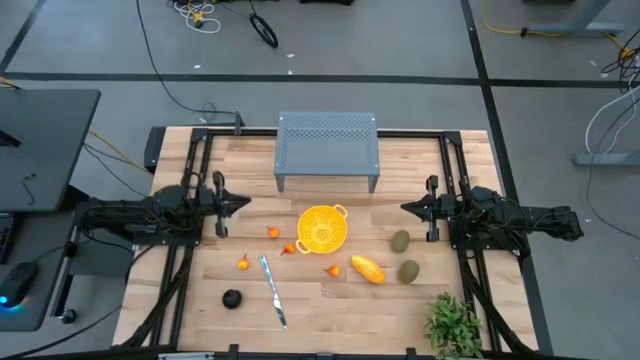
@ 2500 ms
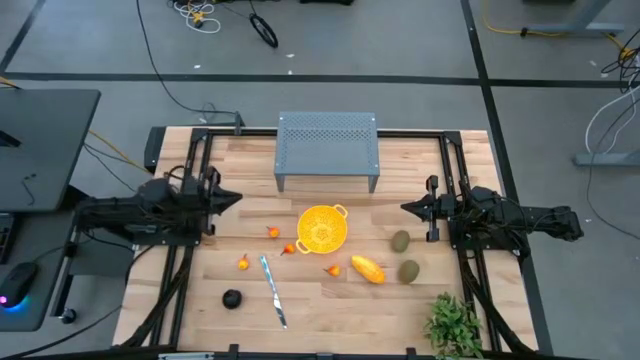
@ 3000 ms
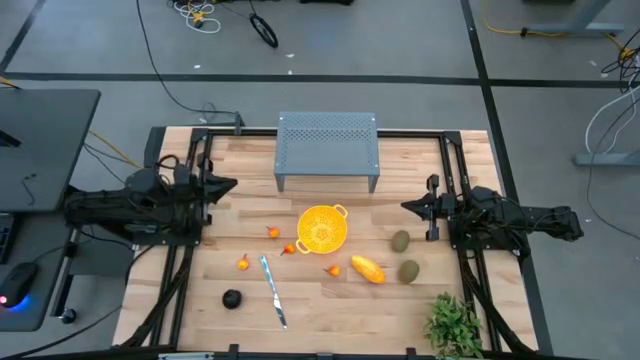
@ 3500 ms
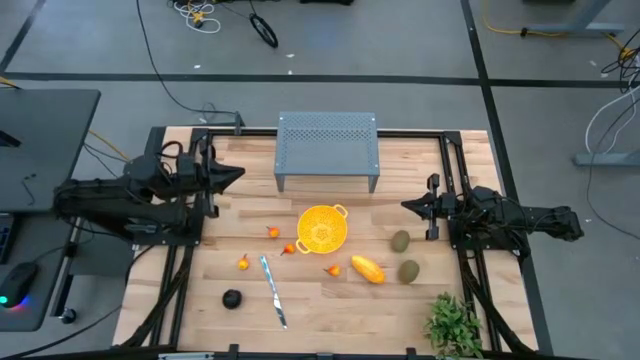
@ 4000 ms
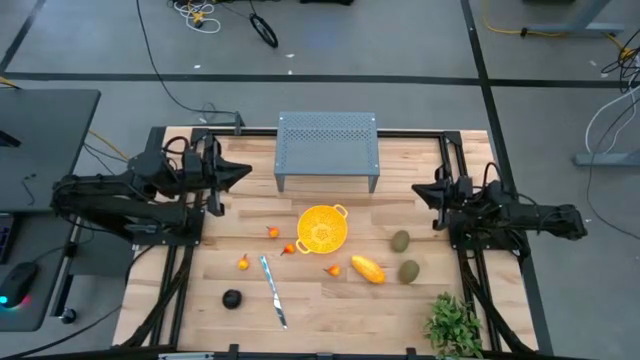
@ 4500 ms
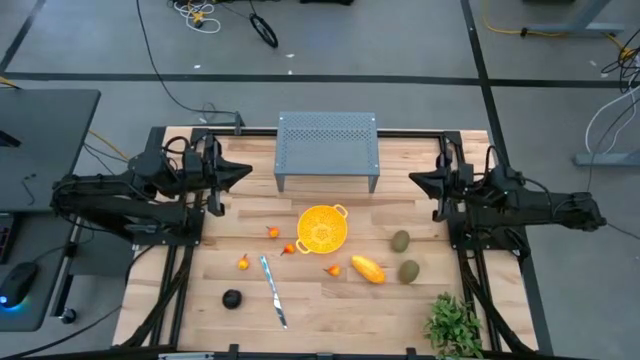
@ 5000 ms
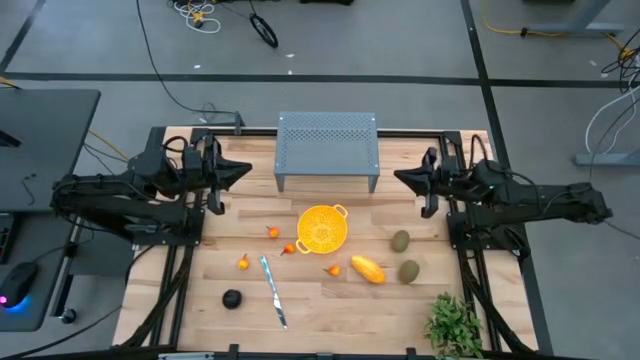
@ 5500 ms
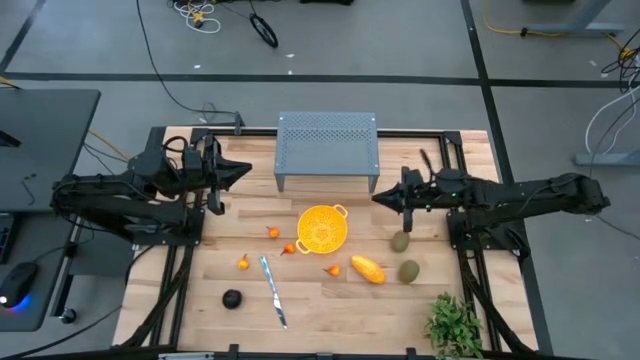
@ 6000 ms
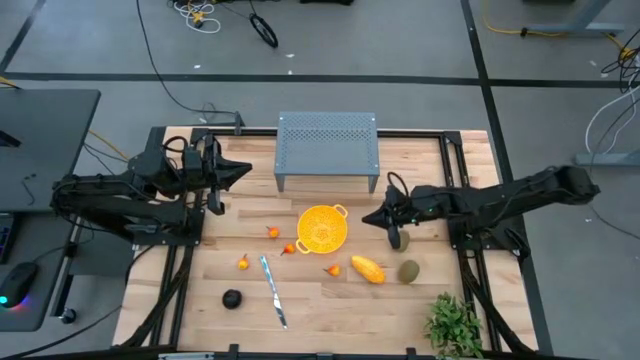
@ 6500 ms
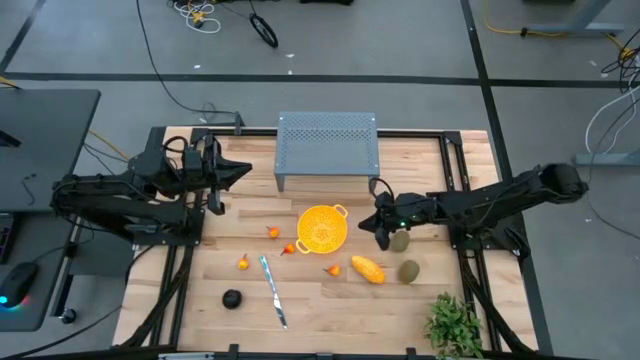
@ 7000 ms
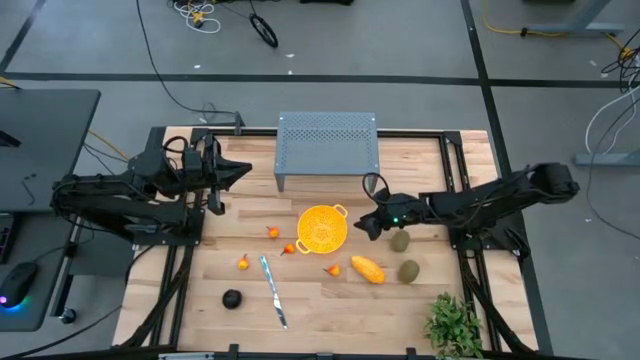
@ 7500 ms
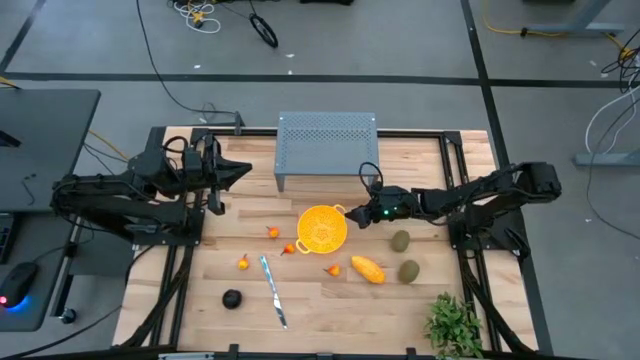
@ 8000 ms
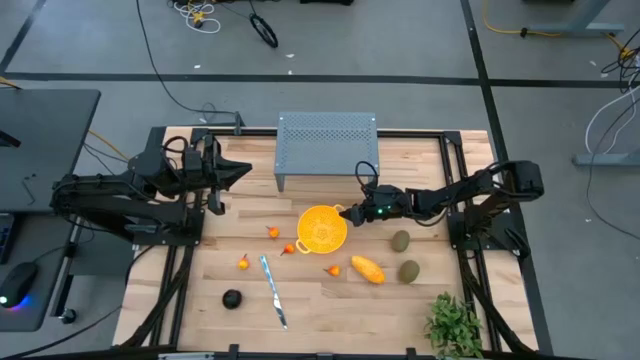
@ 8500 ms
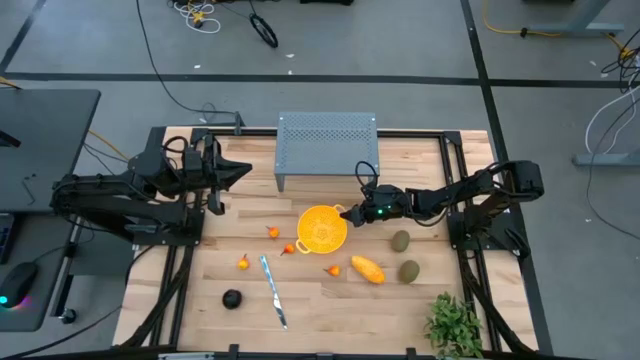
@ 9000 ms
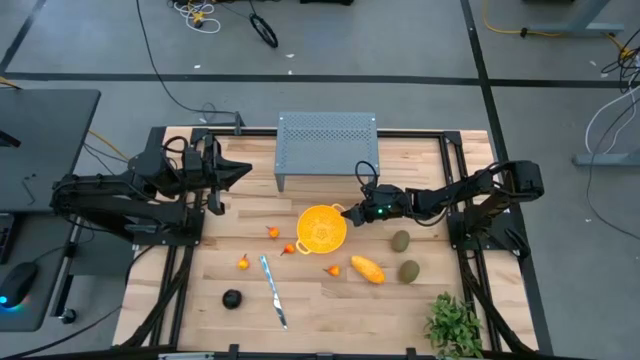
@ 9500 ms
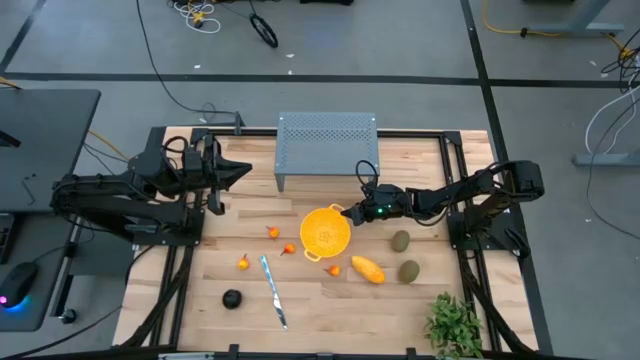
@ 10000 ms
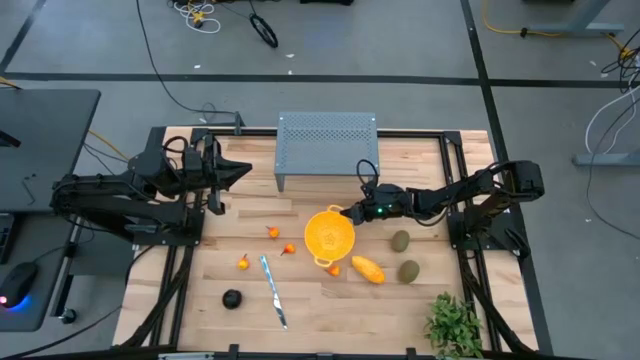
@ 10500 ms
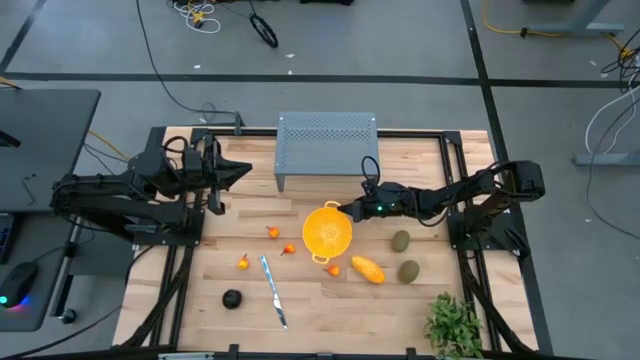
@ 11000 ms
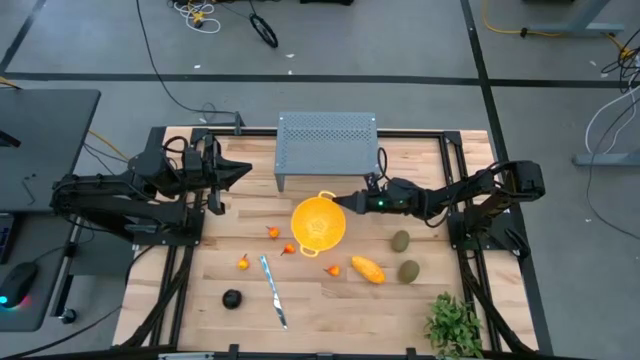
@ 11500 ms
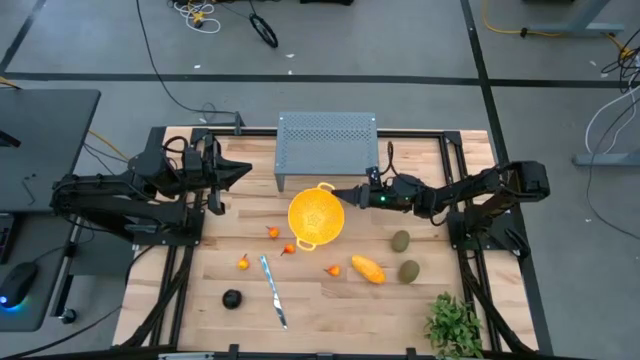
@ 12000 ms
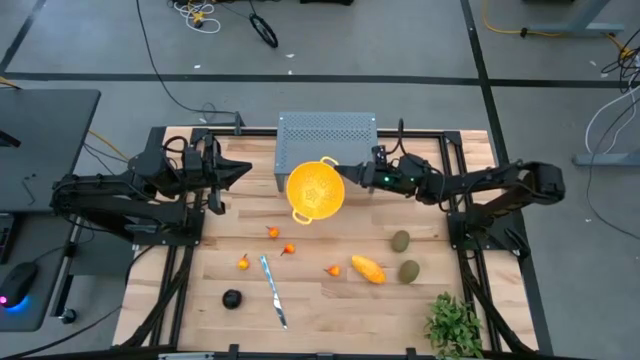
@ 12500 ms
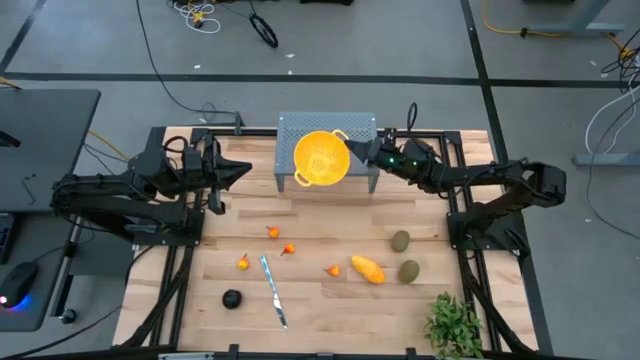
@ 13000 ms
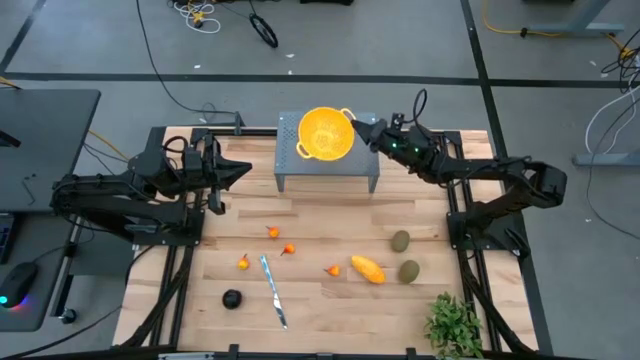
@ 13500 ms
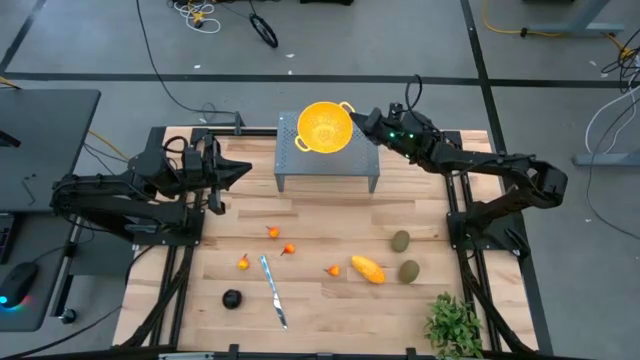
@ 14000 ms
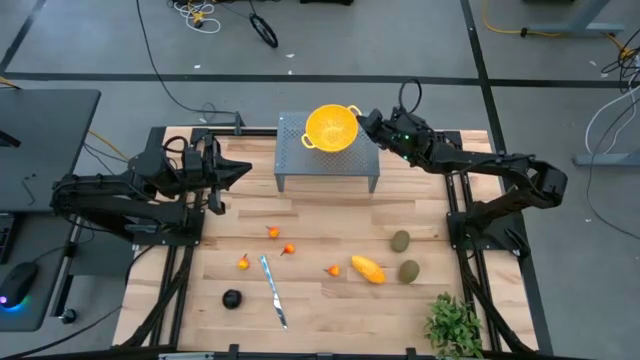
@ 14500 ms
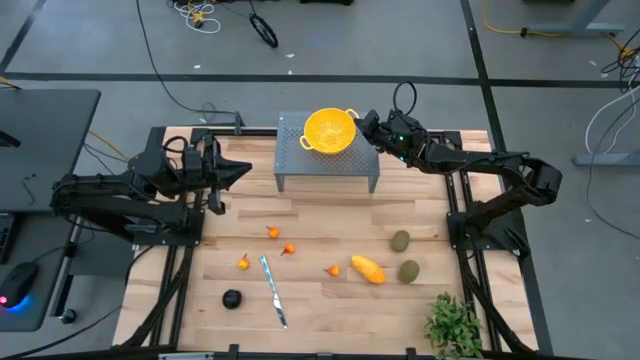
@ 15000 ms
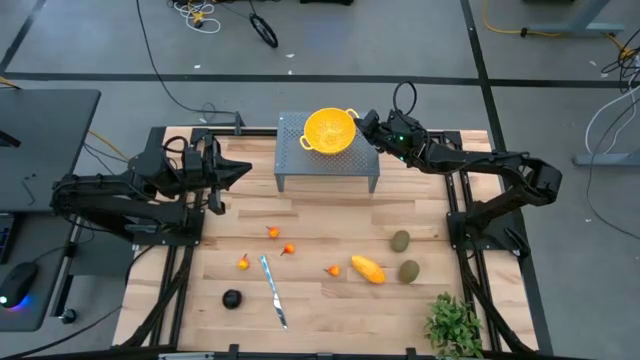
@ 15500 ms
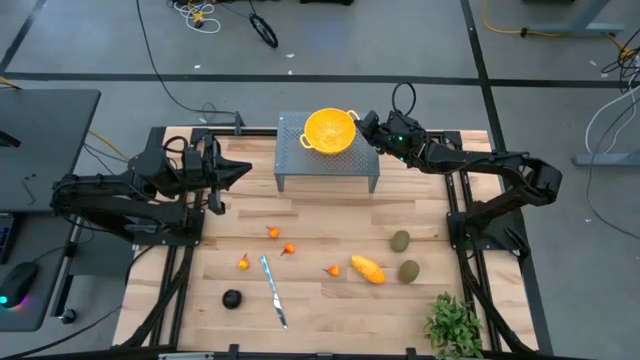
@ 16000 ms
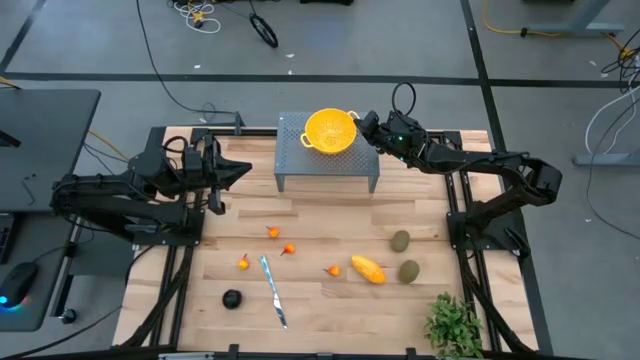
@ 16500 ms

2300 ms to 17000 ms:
Task: Pick & Place Fruit
Put the yellow colander bowl on the shelf

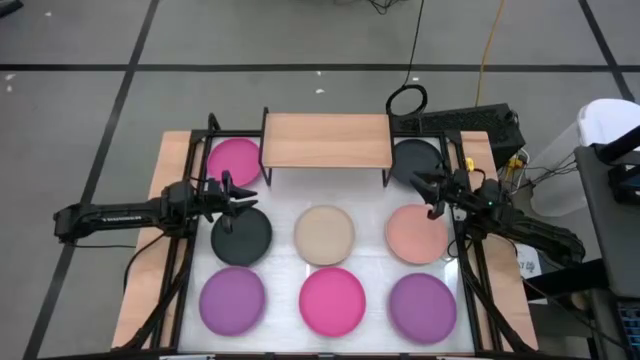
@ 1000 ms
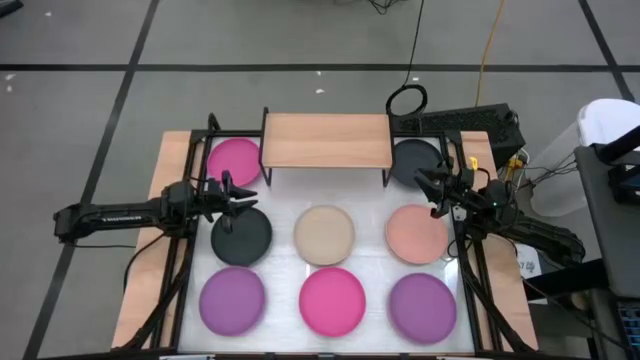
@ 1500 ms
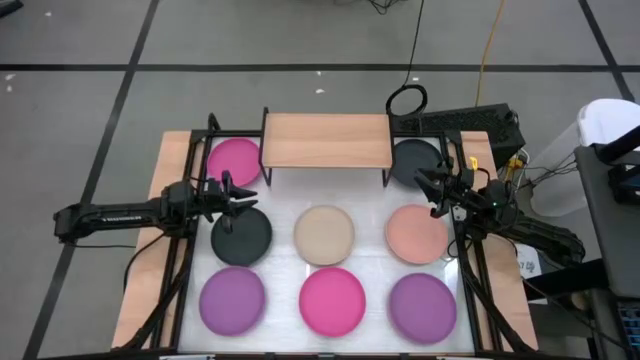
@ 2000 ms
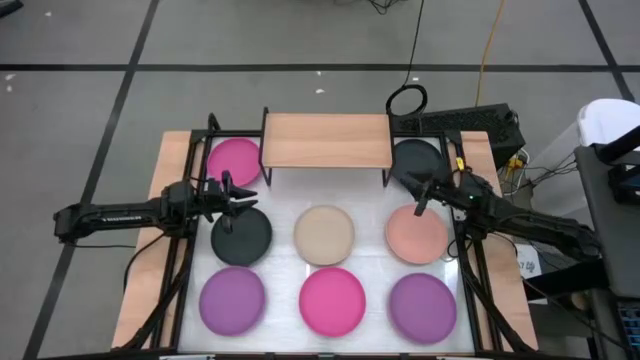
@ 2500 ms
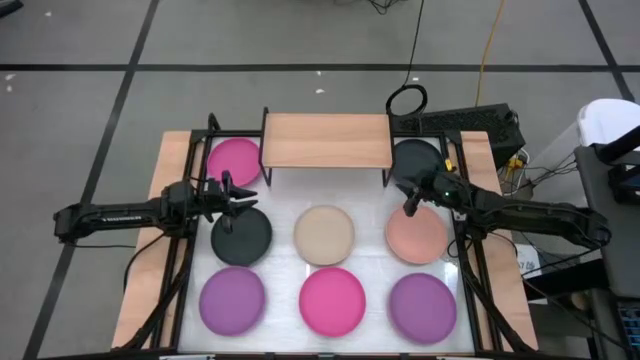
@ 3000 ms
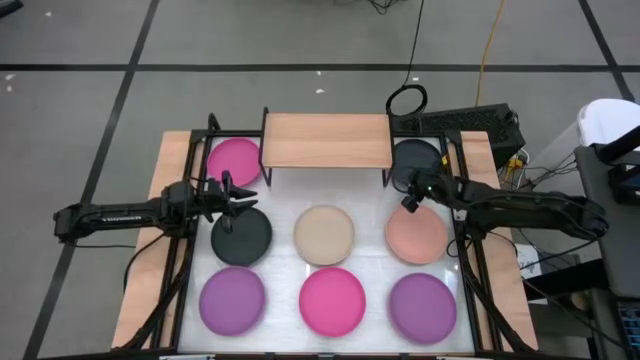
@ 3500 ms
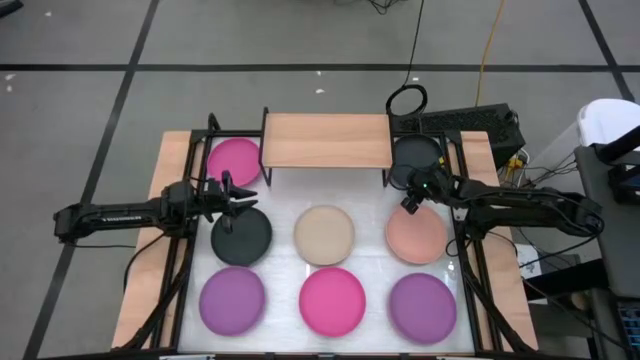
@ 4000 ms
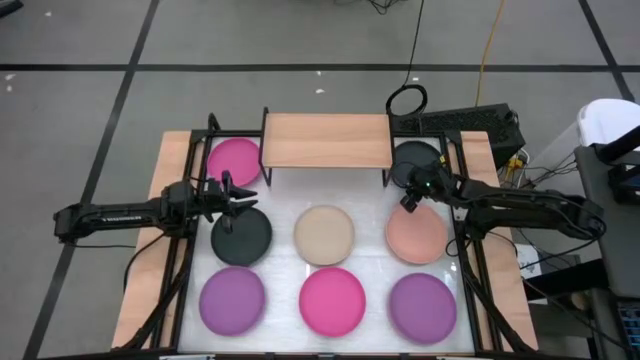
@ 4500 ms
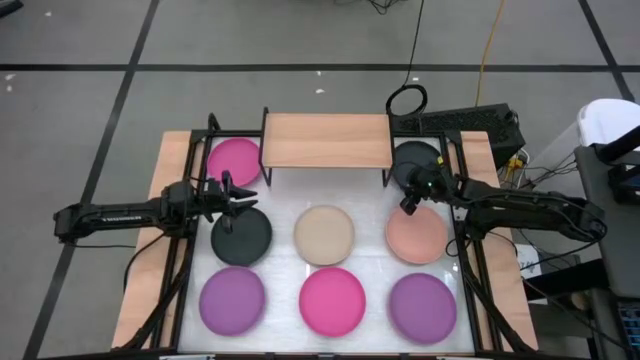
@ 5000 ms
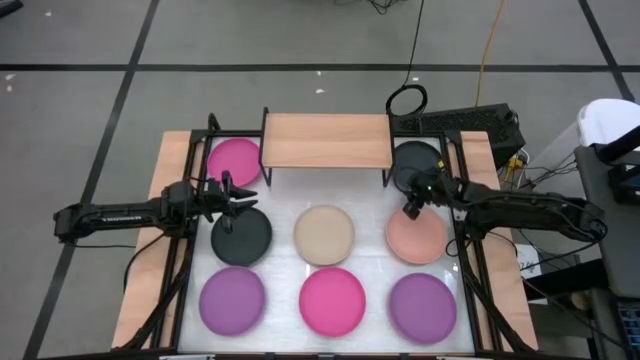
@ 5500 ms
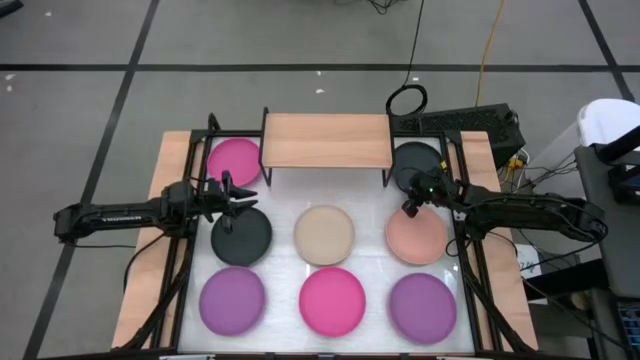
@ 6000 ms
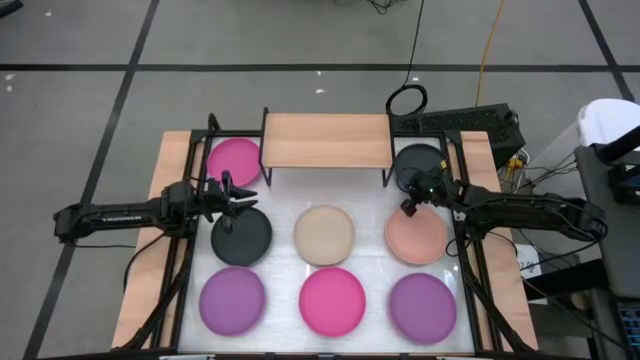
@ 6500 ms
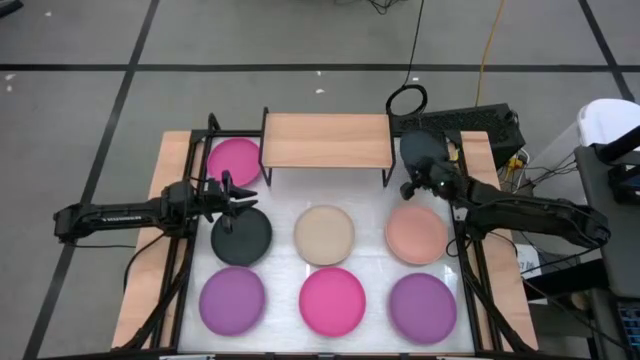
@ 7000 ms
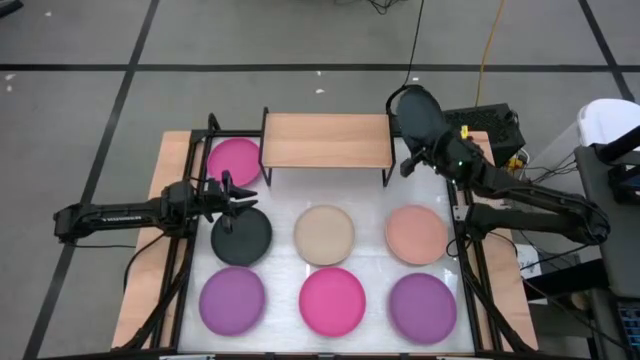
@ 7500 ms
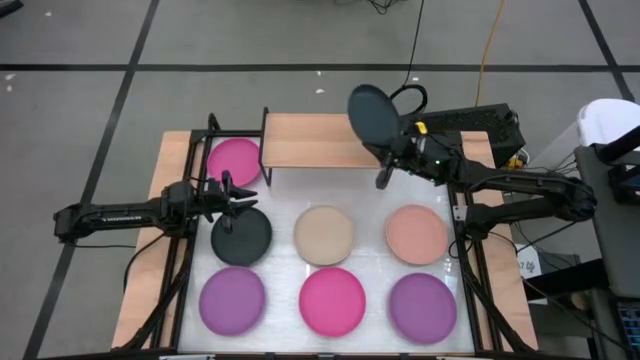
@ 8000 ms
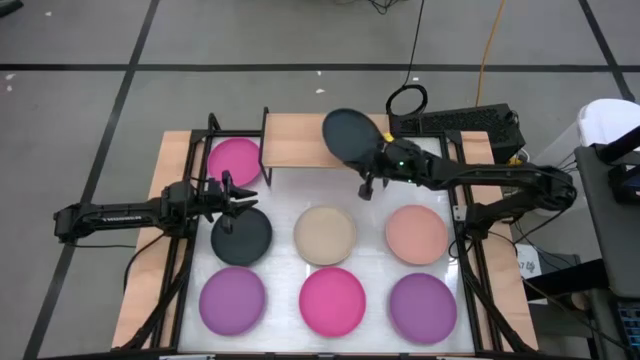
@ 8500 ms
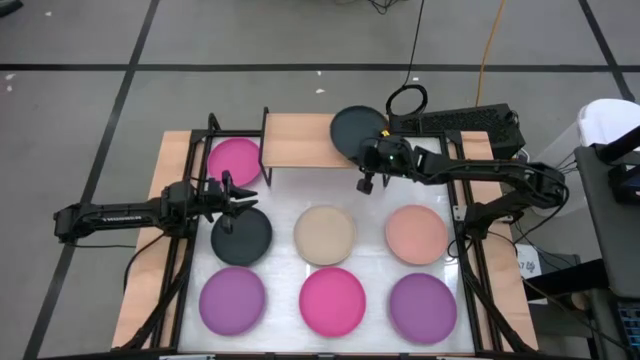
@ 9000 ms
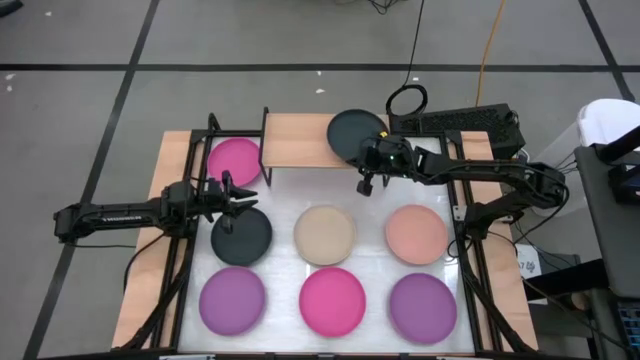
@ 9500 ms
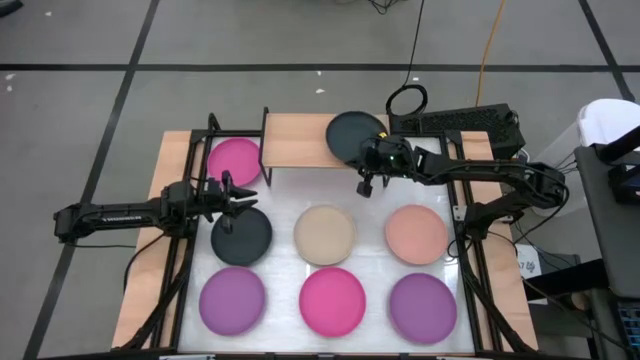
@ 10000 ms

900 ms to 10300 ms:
Task: Place and stack plates onto a shelf
Put the right black plate on the shelf
